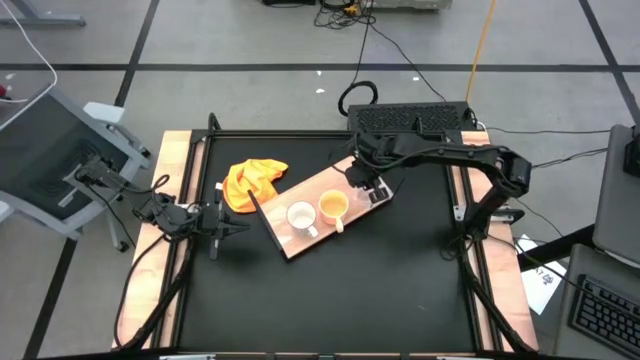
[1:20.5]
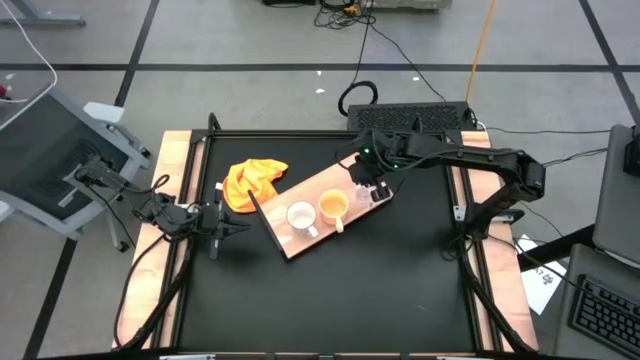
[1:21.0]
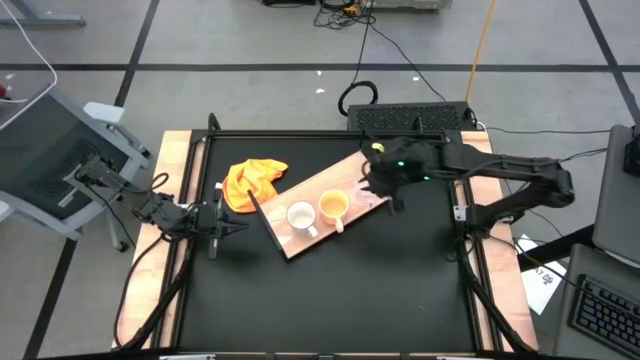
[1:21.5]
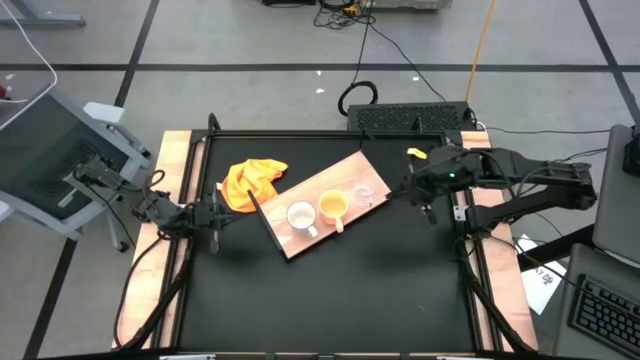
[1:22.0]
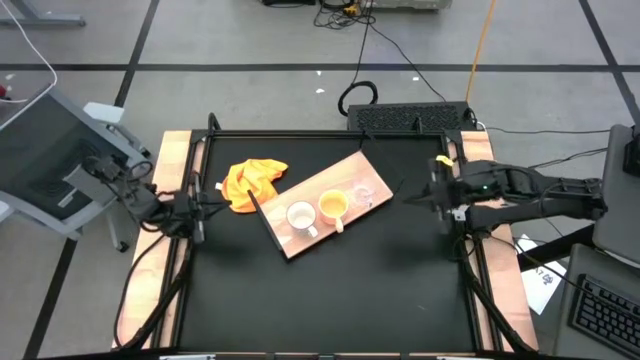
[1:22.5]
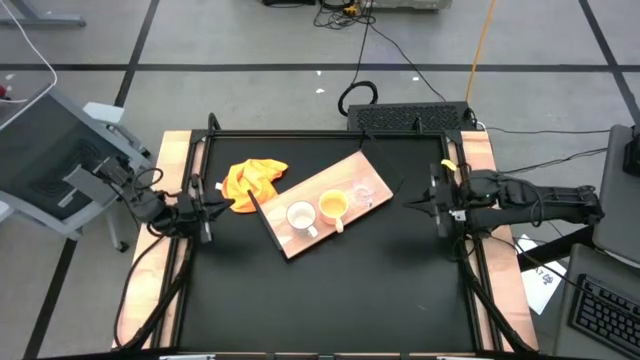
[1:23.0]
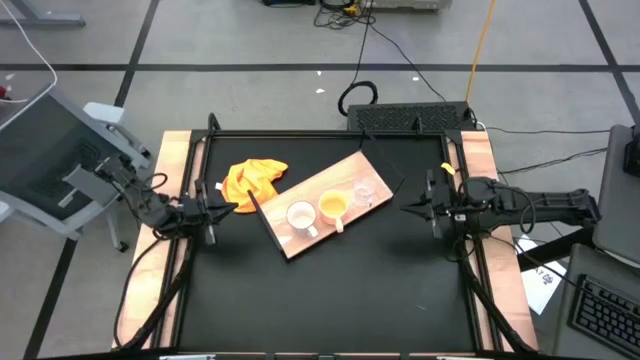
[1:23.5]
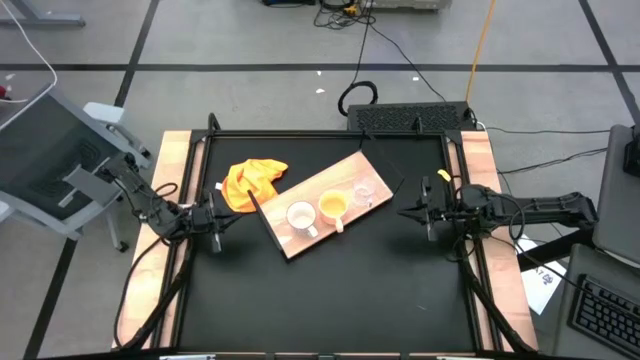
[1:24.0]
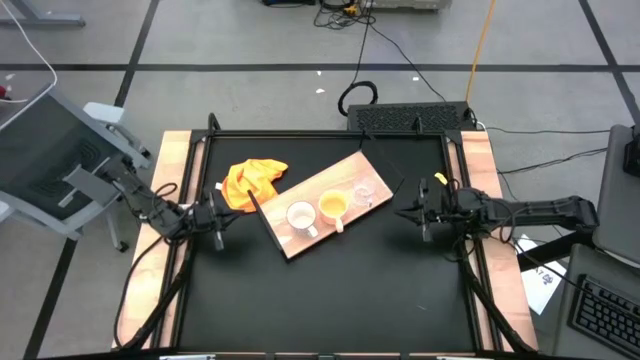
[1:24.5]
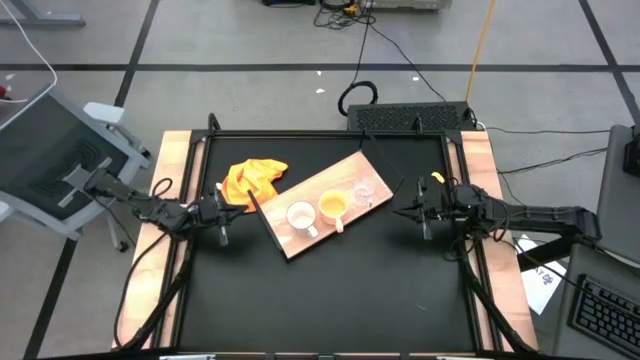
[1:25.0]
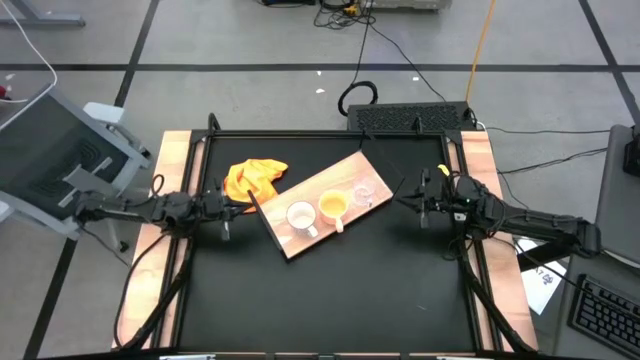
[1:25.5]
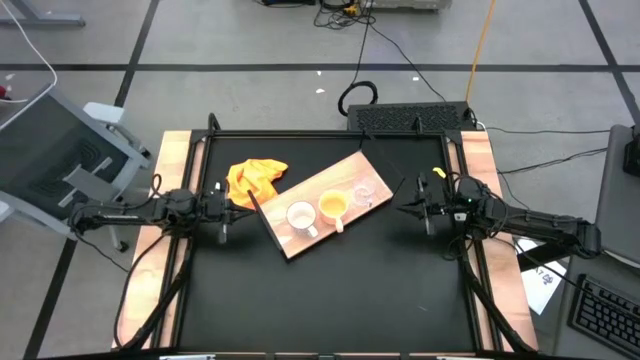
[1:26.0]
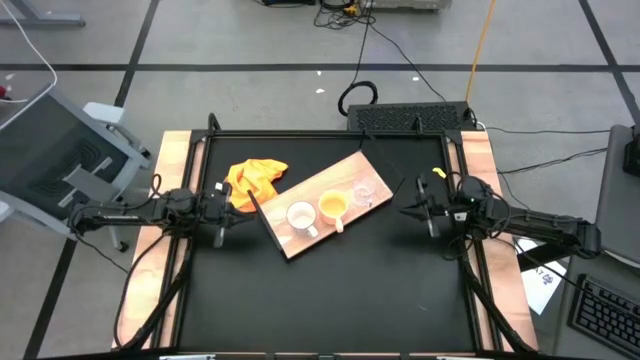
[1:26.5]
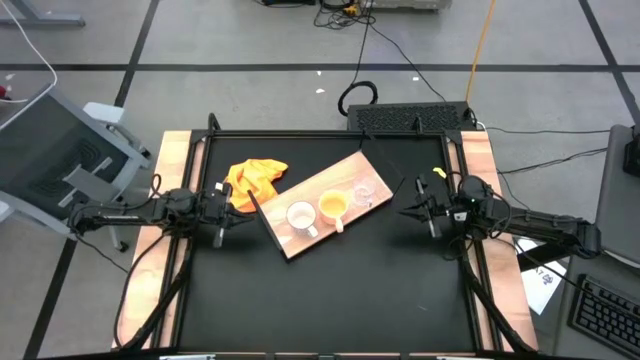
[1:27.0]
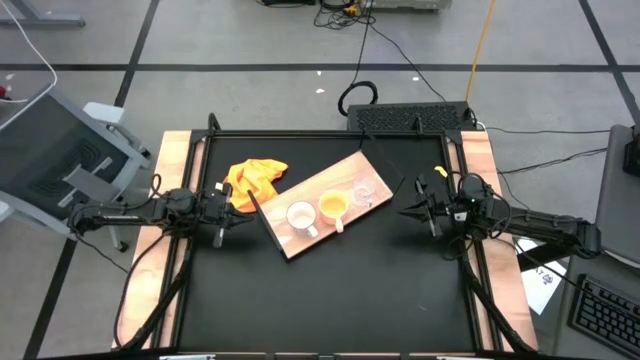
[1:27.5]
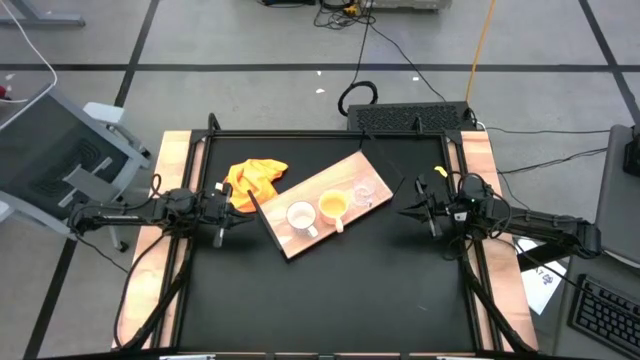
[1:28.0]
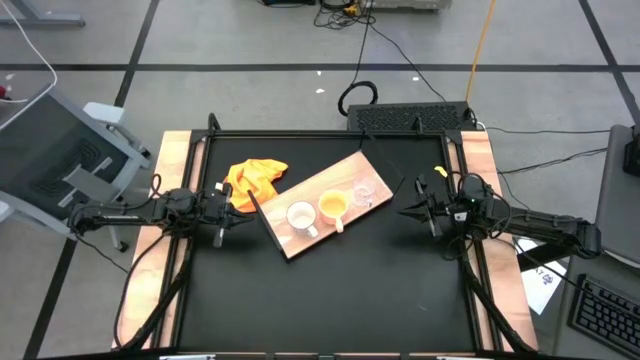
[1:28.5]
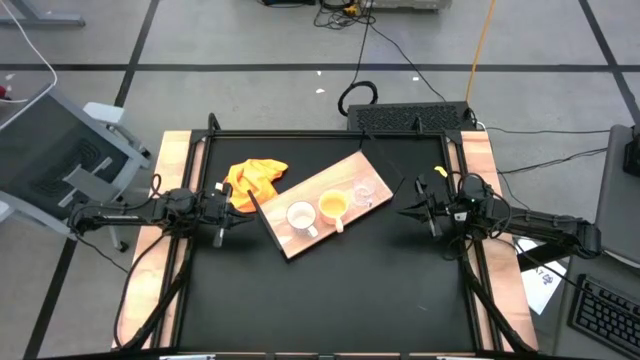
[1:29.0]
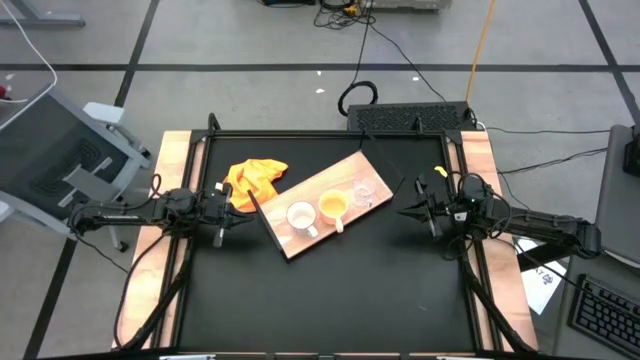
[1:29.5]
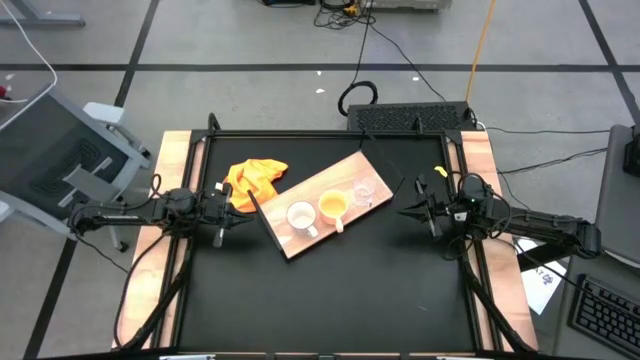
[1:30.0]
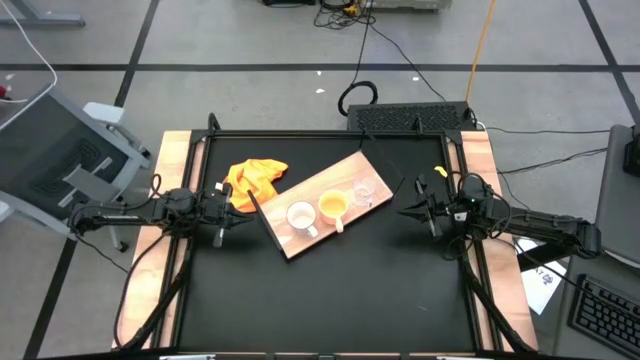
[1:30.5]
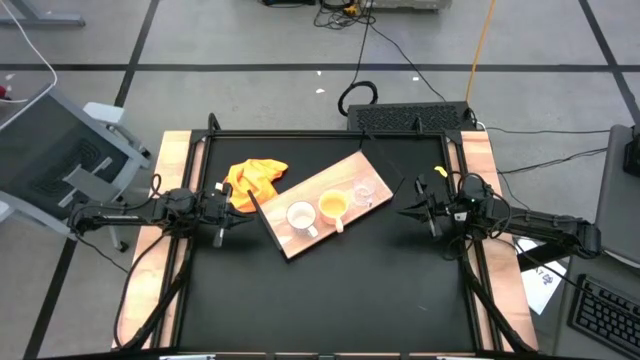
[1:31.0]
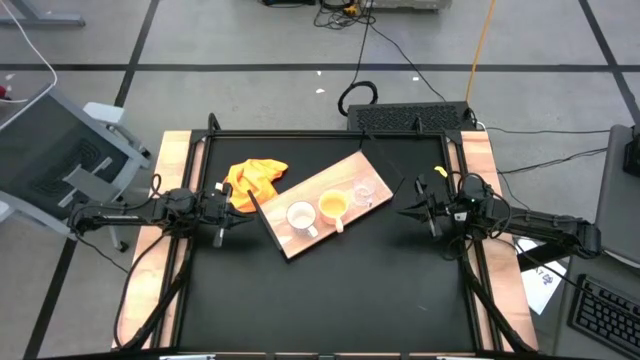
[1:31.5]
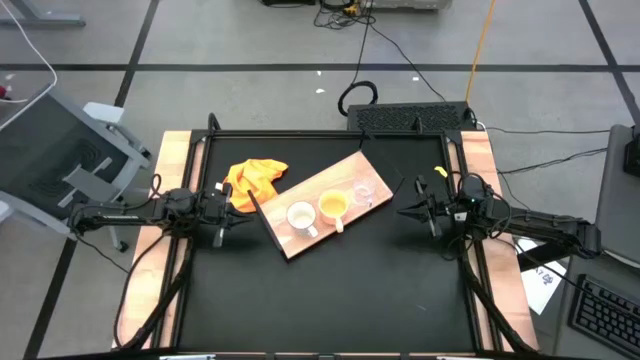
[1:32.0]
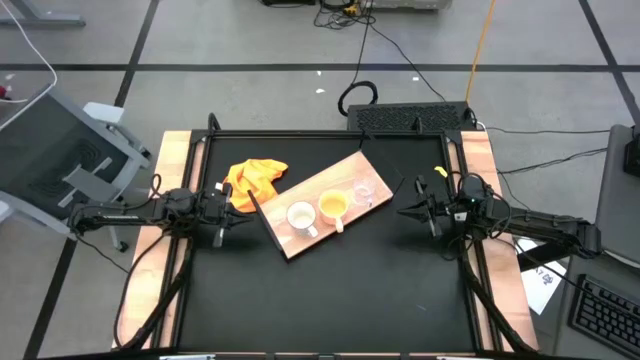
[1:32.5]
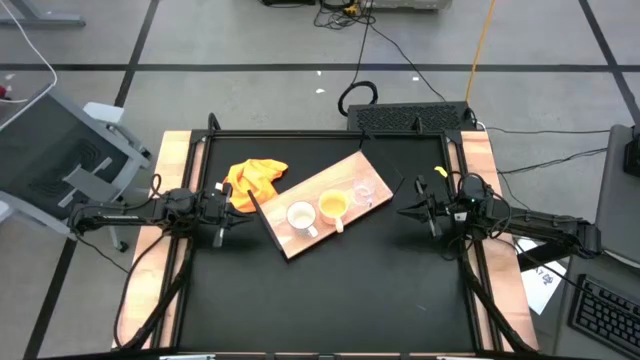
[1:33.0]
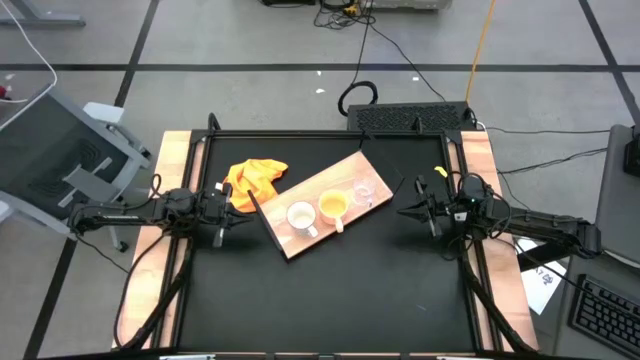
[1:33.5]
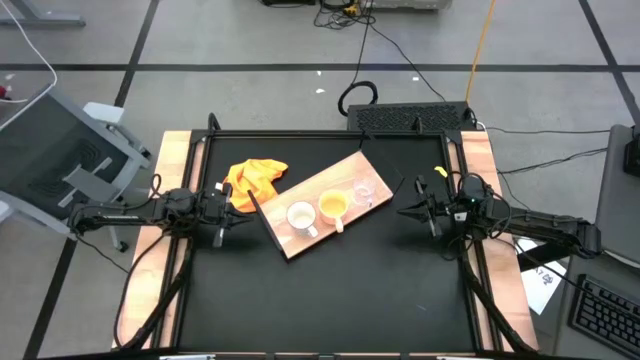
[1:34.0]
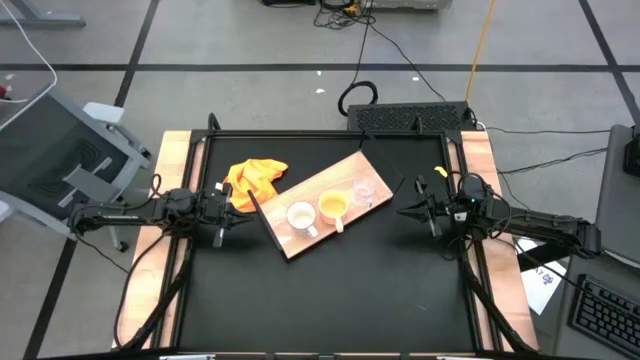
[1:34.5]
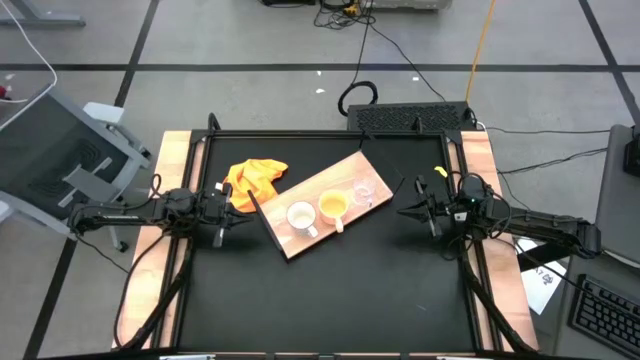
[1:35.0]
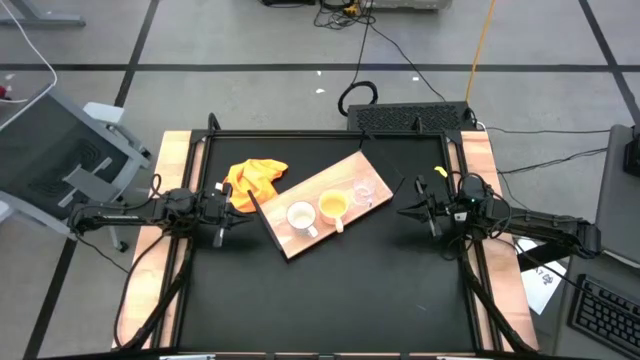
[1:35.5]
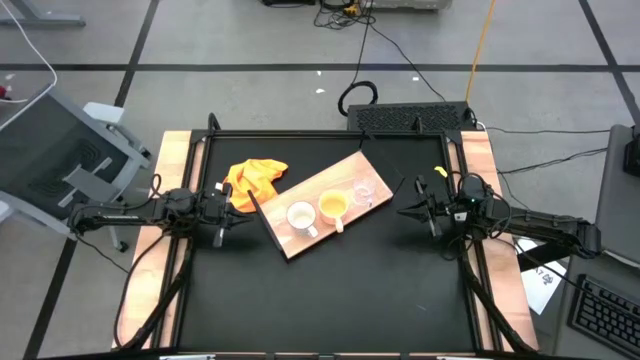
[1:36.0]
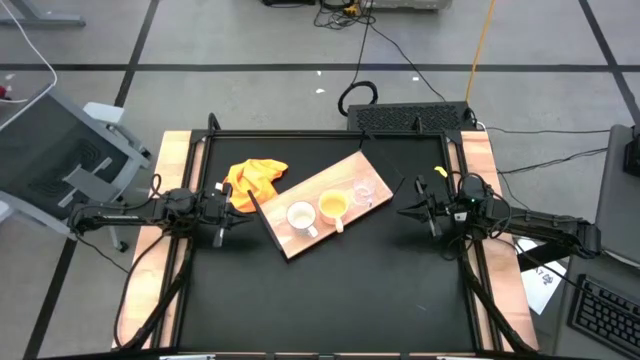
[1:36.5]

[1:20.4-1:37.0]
Task: Stack small to large cups/mugs on shelf
Return to Home Position
